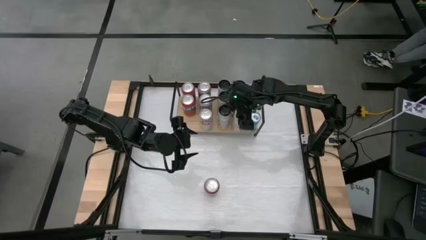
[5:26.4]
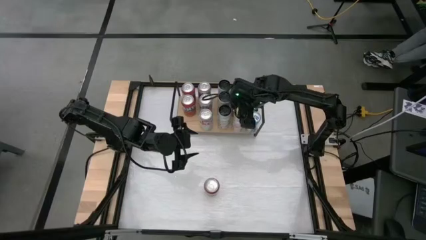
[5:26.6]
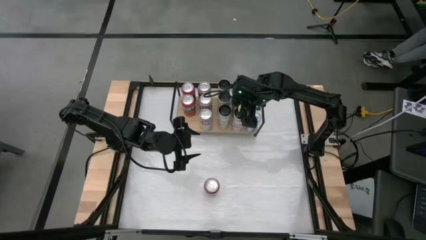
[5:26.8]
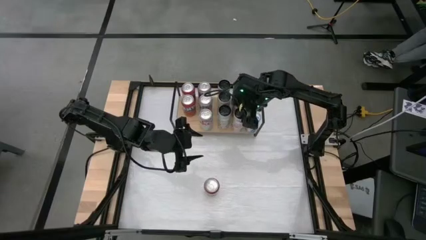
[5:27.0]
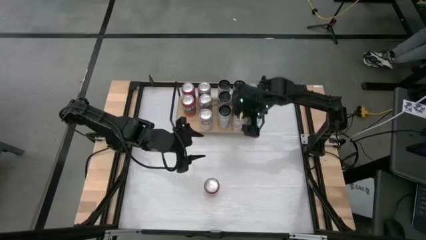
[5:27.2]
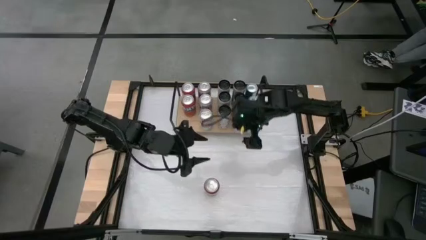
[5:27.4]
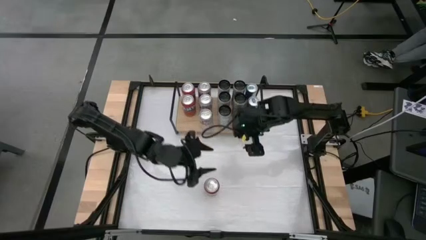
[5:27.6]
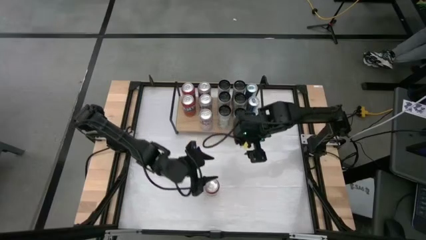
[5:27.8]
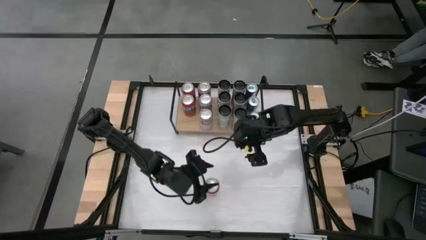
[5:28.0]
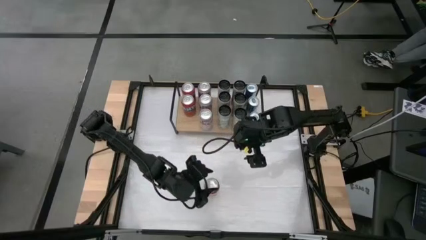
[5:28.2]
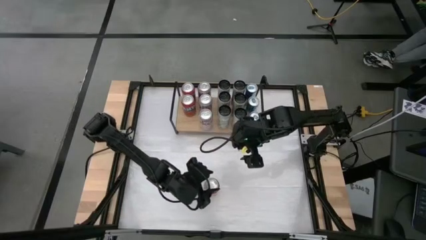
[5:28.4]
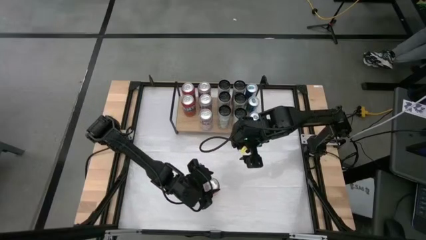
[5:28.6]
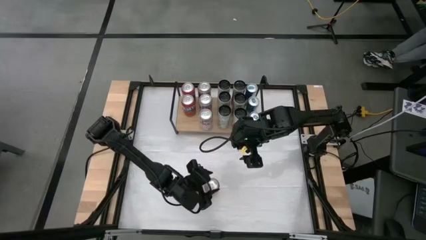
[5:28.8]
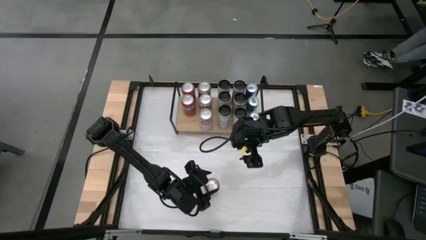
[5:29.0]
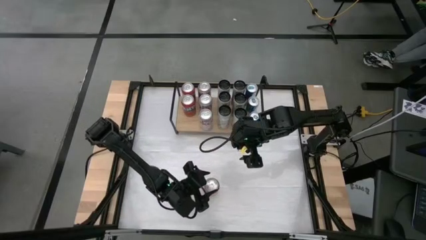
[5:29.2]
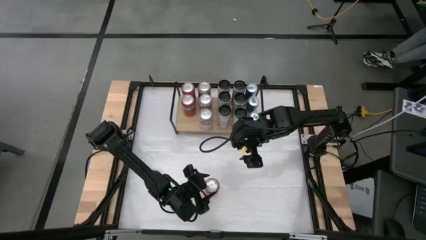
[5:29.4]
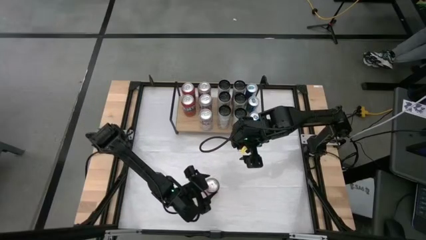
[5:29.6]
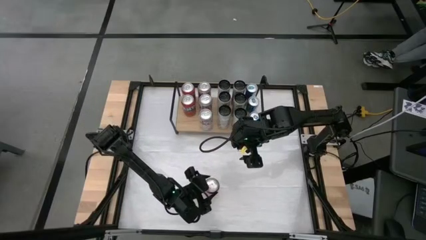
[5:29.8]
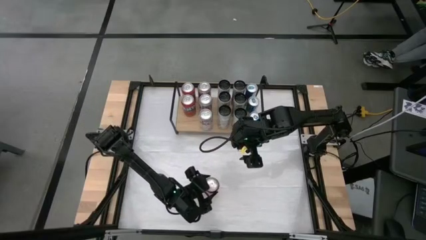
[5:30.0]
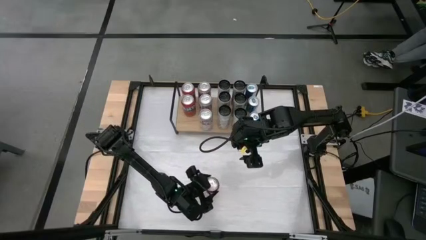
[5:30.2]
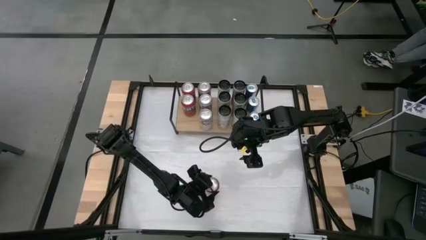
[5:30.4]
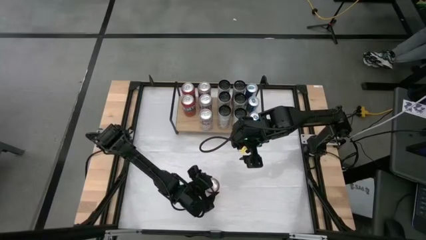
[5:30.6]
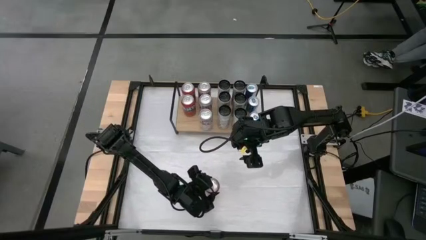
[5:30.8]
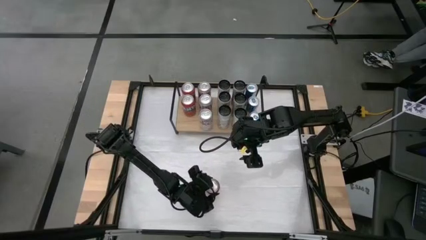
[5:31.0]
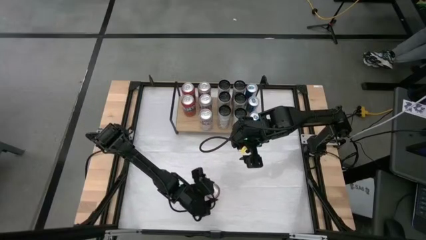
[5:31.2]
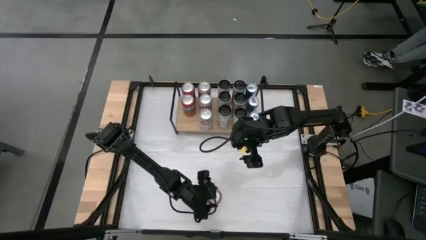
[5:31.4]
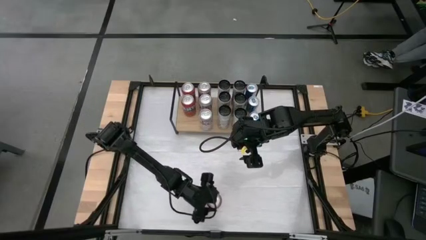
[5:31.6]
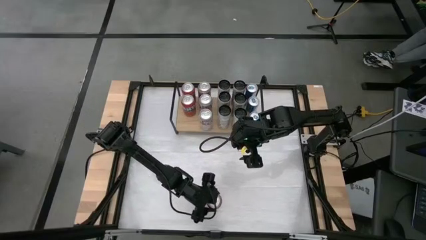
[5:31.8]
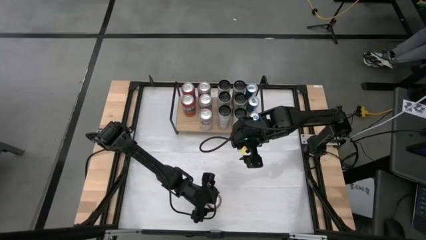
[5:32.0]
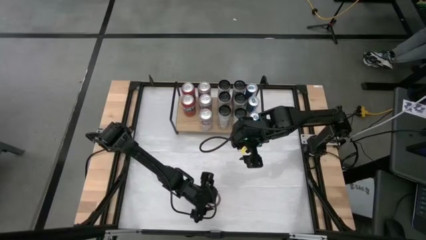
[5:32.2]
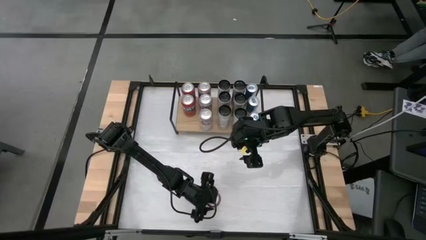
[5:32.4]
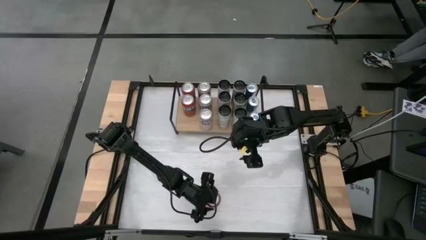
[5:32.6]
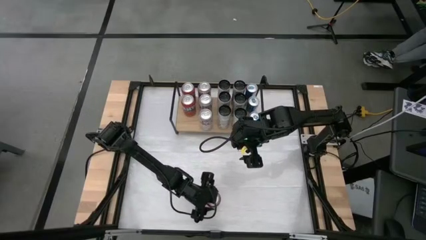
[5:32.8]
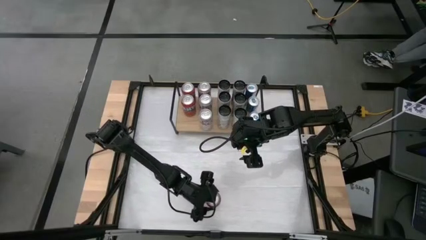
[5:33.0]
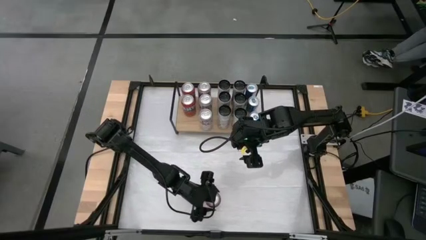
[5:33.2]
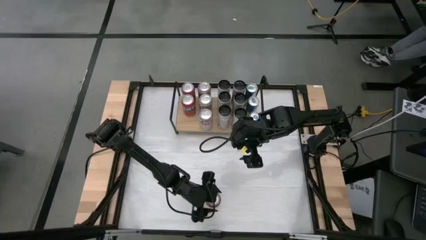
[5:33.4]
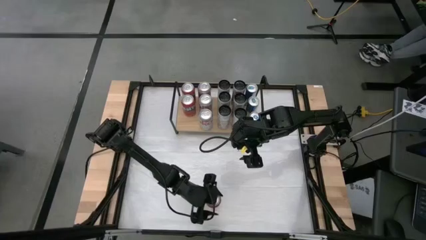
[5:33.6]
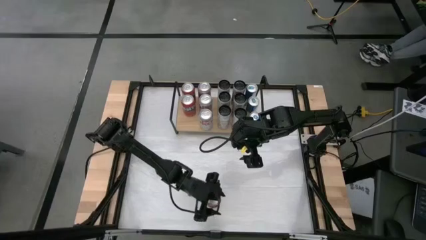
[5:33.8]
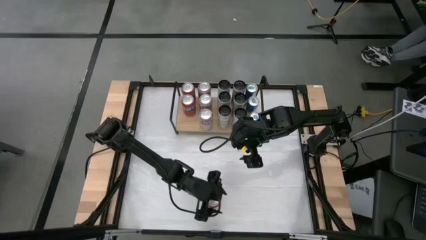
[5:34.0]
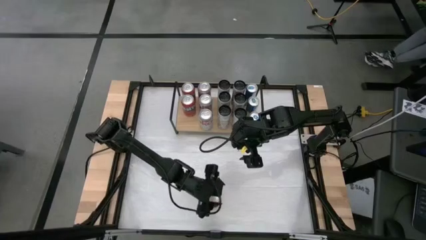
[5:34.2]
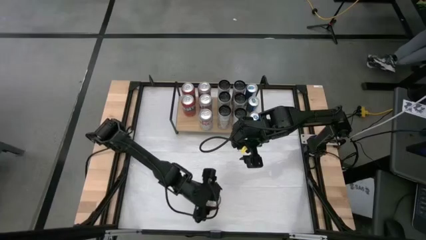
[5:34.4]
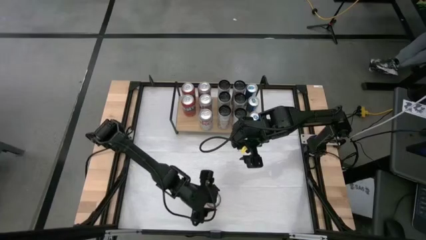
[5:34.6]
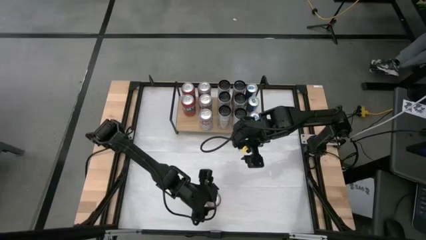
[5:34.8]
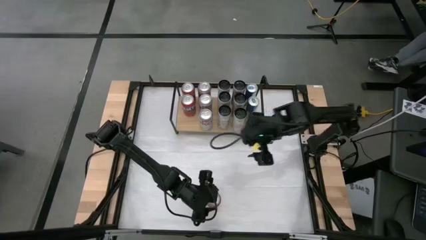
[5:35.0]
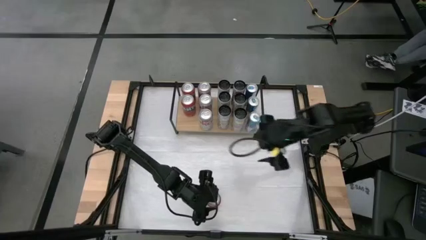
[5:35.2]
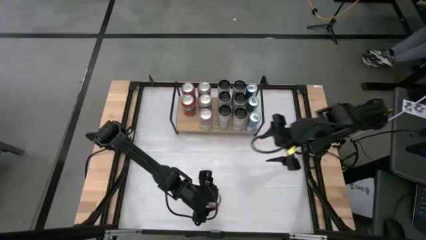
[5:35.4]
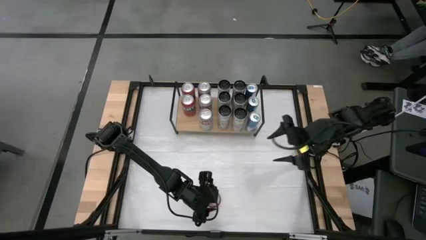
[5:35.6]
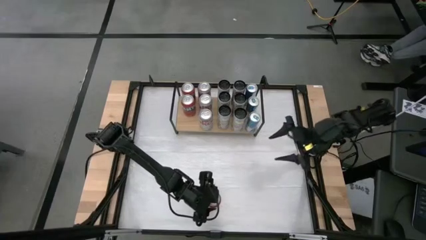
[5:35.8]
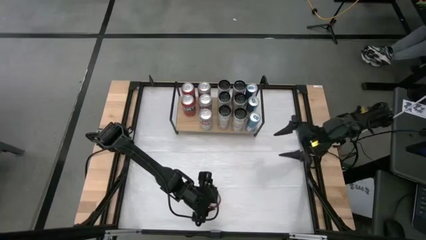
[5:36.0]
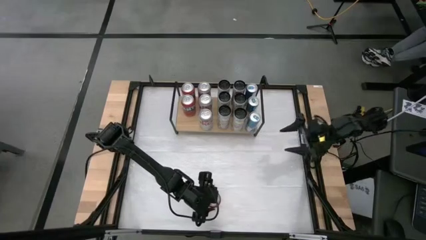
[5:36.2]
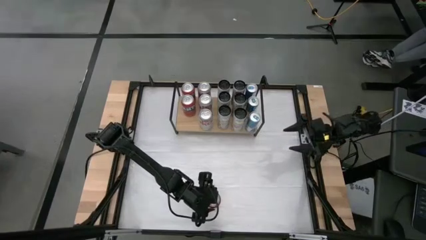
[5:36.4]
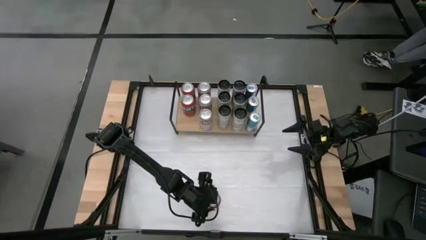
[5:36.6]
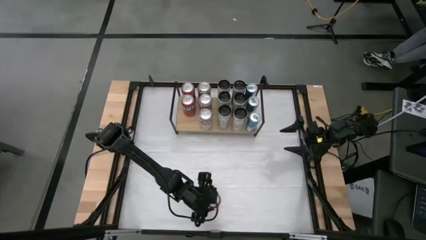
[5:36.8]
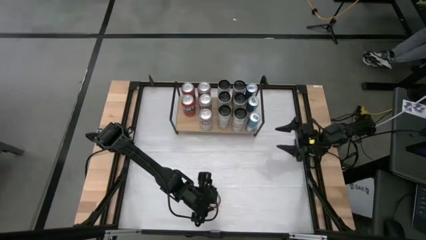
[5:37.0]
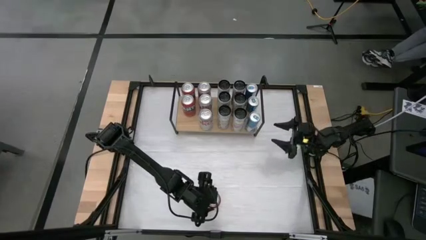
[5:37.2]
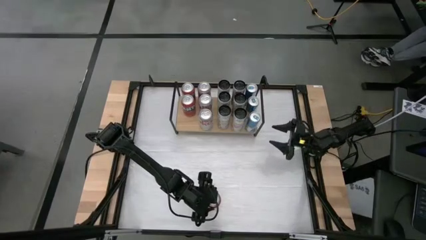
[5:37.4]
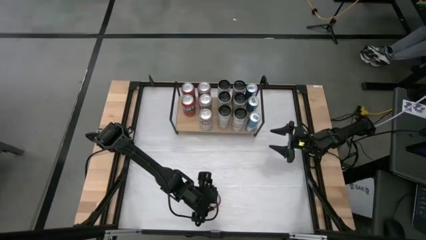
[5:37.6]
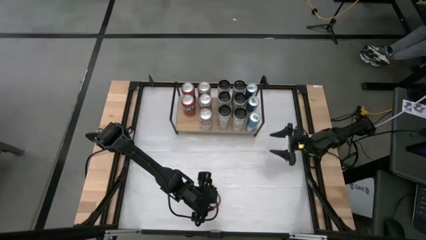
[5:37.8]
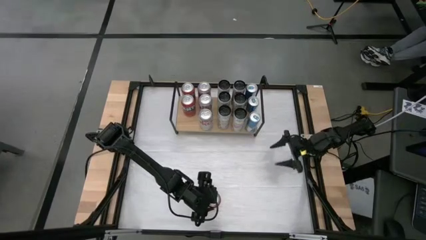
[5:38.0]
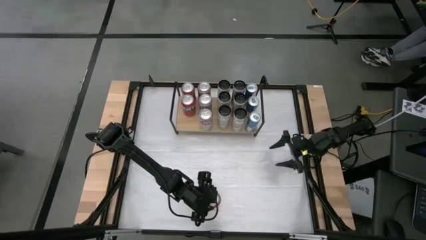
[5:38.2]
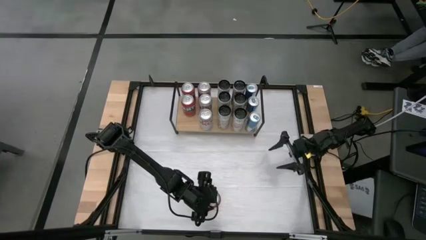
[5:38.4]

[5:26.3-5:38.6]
Task: Place canned beverage on shelf
Put the red soda can onto the shelf aligned with the other red soda cans

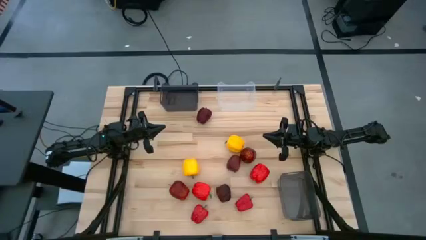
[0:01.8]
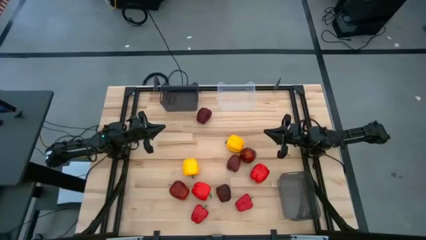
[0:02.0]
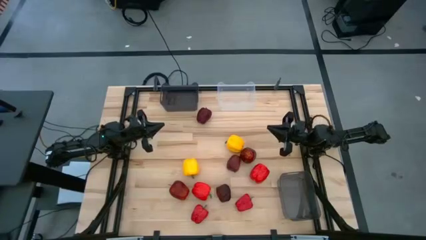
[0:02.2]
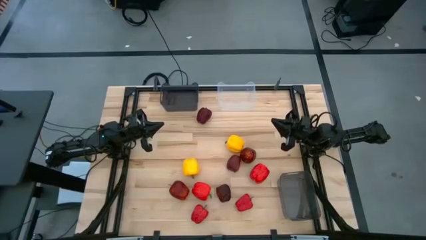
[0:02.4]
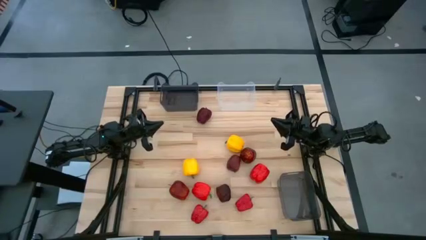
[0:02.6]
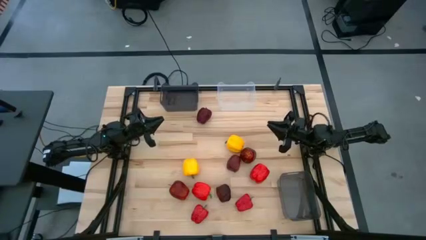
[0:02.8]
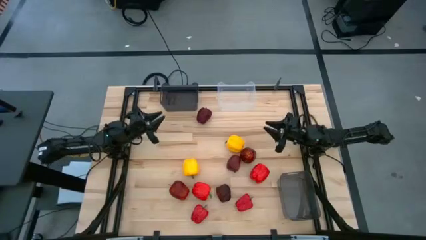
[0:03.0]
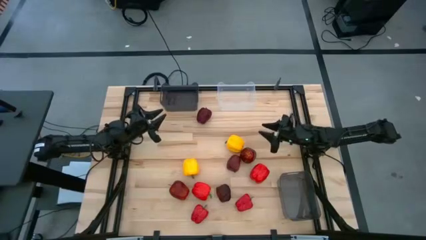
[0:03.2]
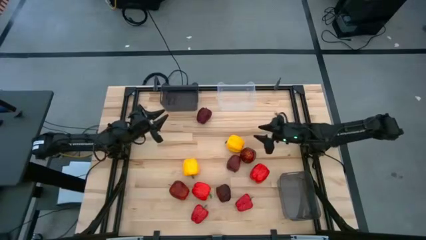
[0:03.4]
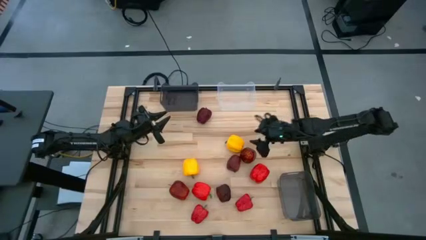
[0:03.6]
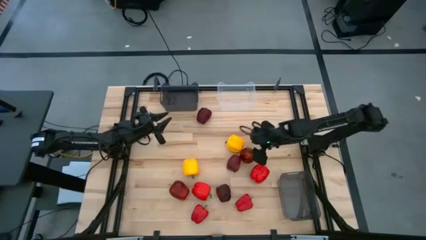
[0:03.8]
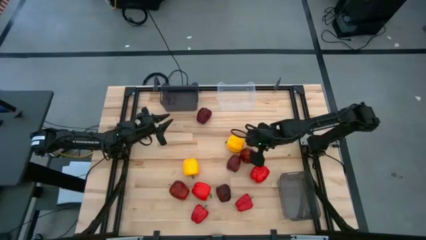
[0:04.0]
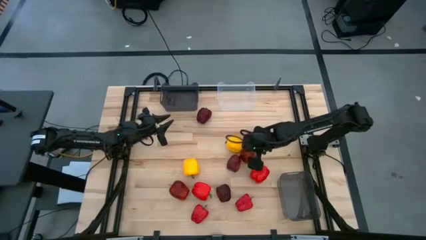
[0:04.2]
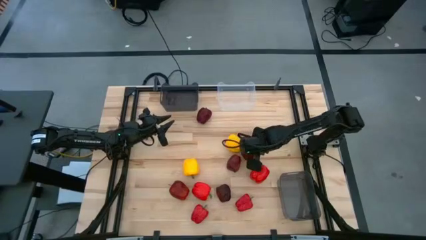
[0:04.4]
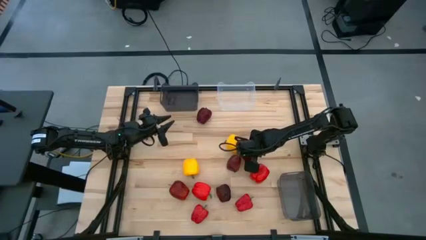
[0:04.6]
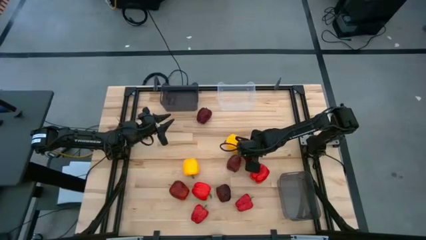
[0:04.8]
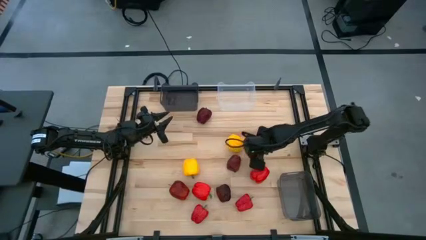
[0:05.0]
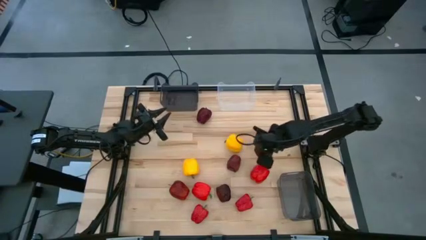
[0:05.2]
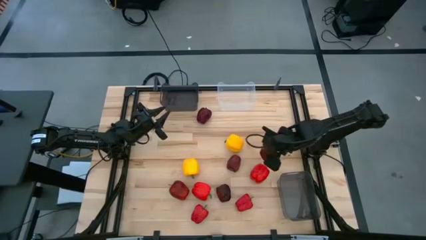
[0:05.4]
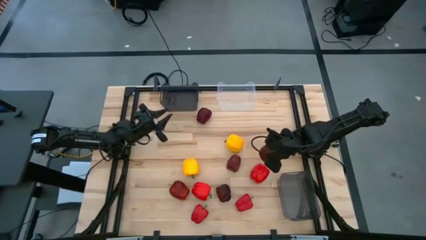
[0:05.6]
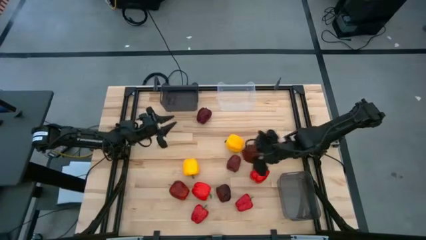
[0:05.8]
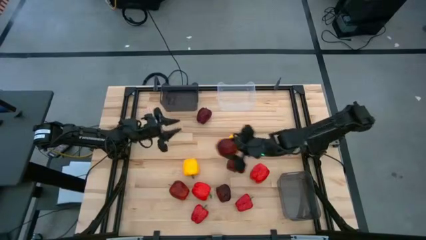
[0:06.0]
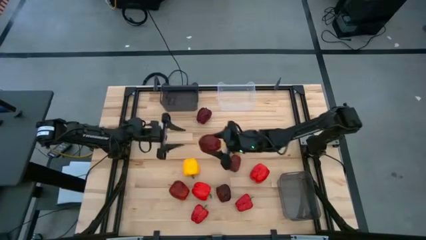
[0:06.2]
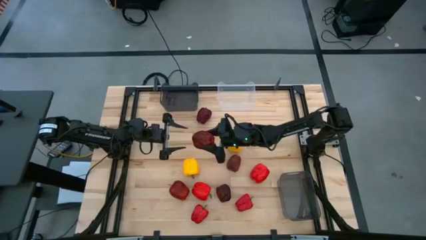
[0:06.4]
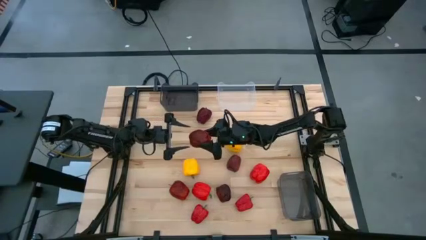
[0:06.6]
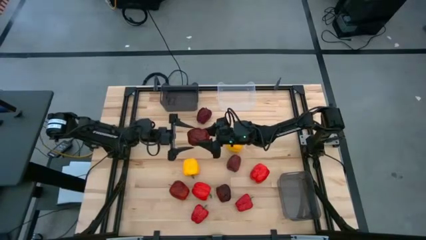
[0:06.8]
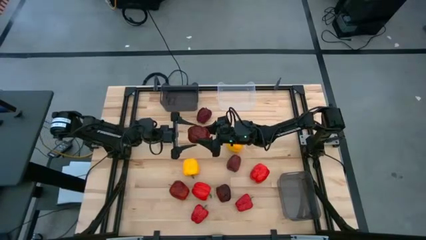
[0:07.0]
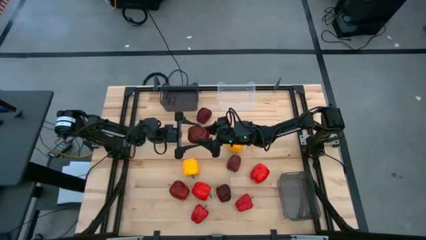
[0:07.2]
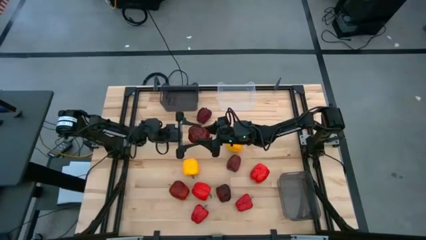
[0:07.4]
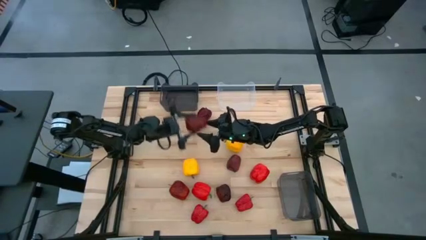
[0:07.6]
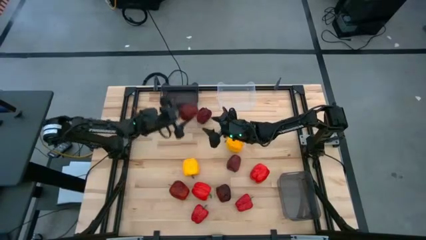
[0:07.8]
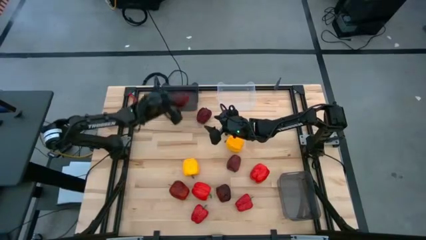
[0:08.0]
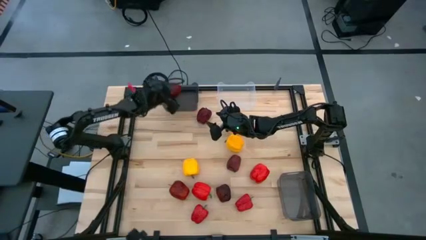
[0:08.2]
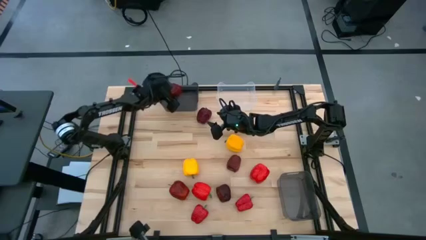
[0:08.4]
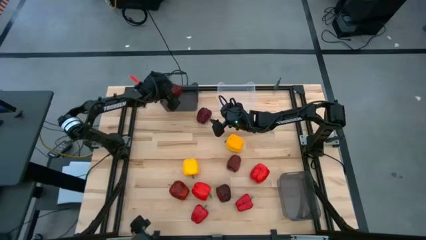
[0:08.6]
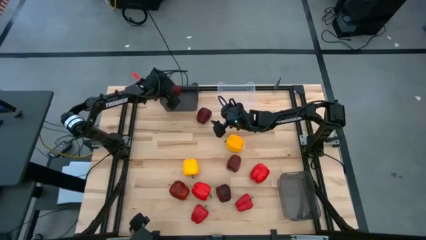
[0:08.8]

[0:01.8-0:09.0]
Task: Sort produce into baskets
Put the red apple into the top black bin
